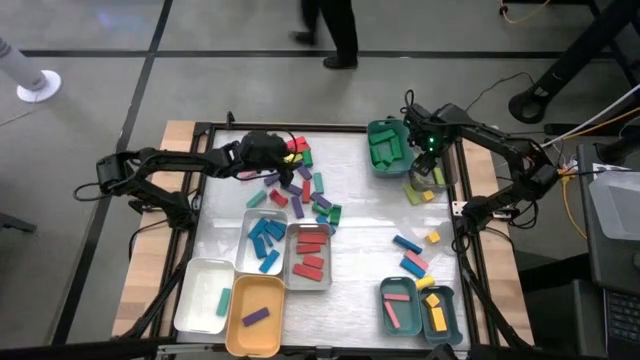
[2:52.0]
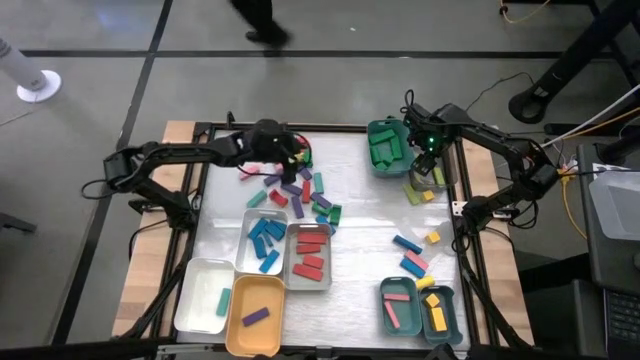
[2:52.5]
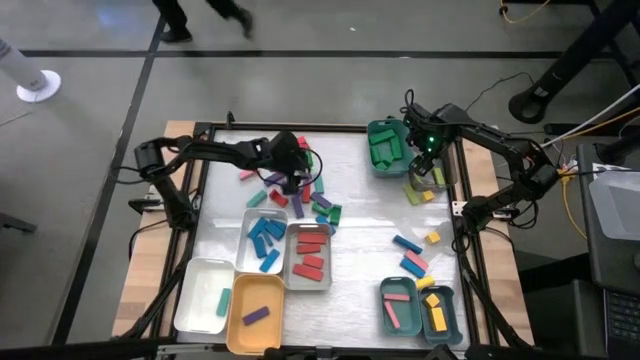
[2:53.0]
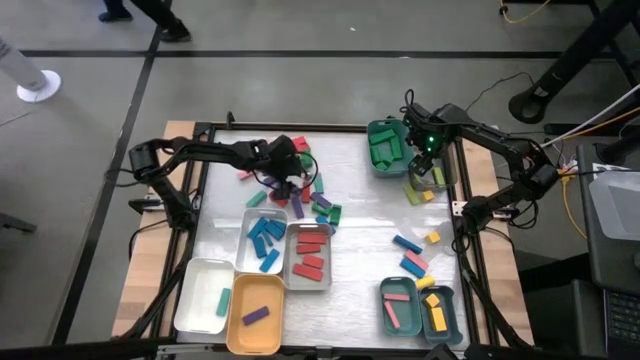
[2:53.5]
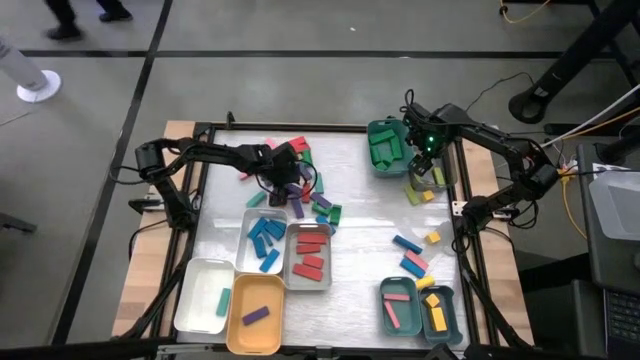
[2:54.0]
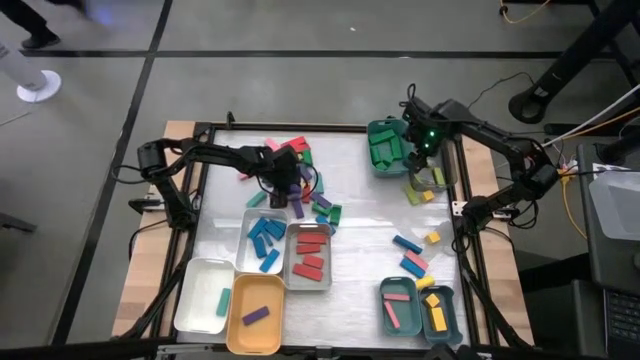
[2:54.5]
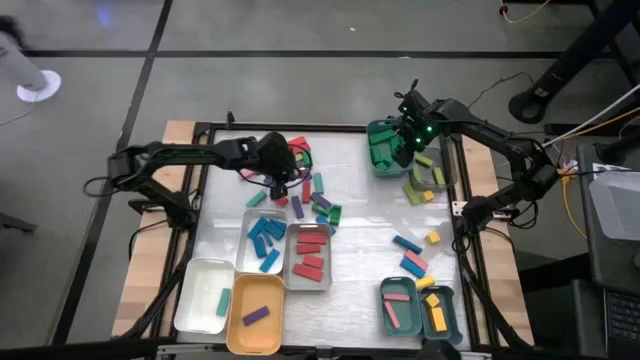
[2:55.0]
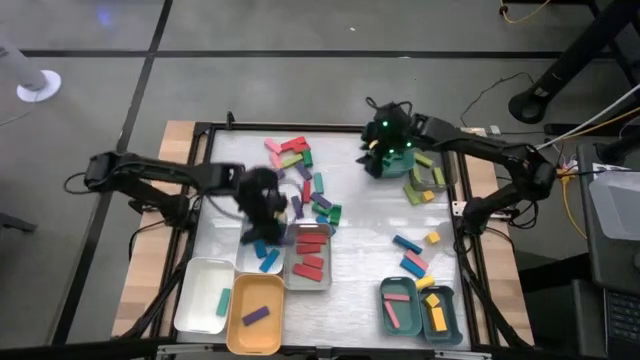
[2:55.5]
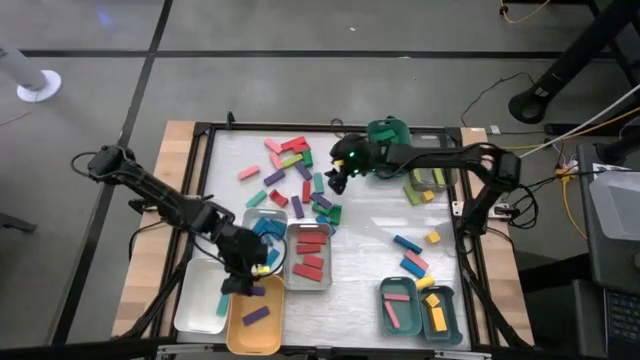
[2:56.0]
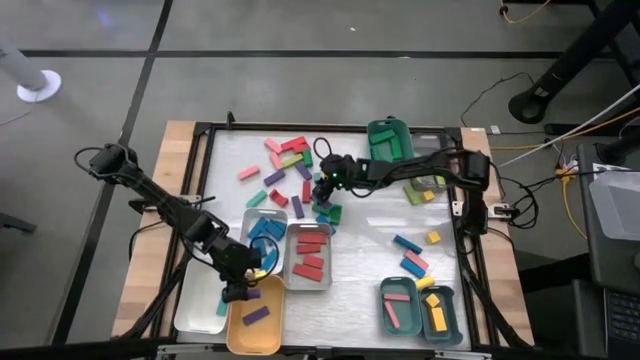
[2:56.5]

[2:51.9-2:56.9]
Task: Sort blocks
Put the purple block into the yellow bin

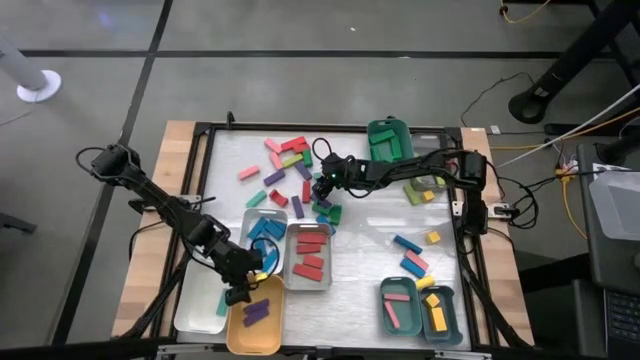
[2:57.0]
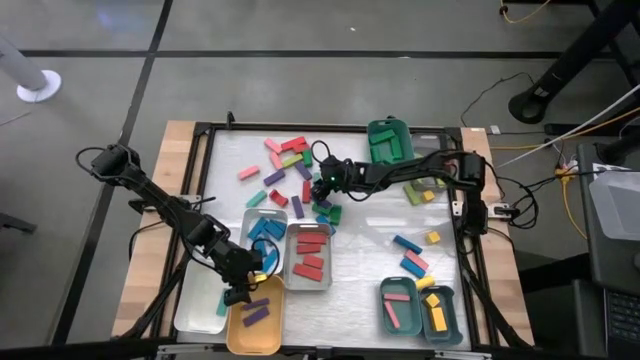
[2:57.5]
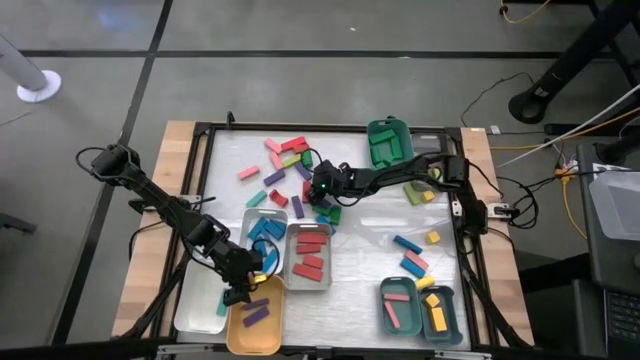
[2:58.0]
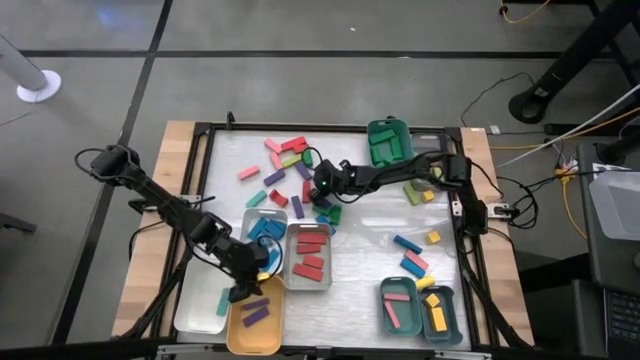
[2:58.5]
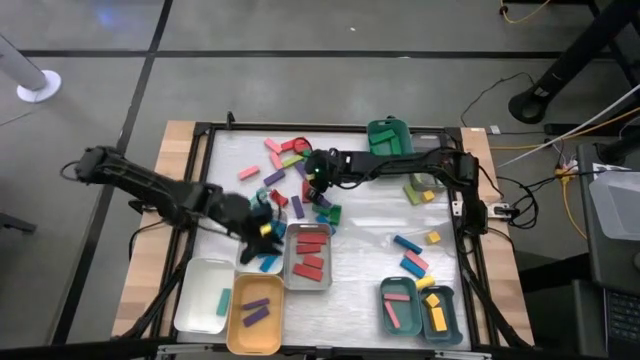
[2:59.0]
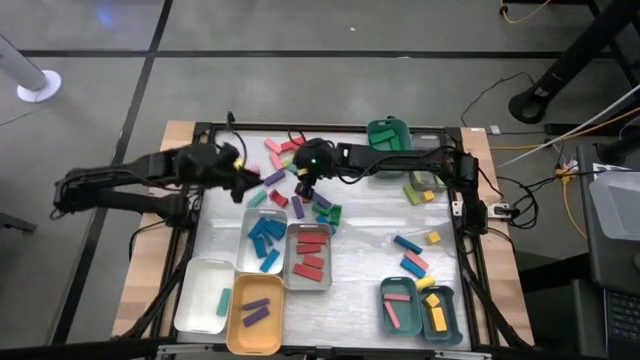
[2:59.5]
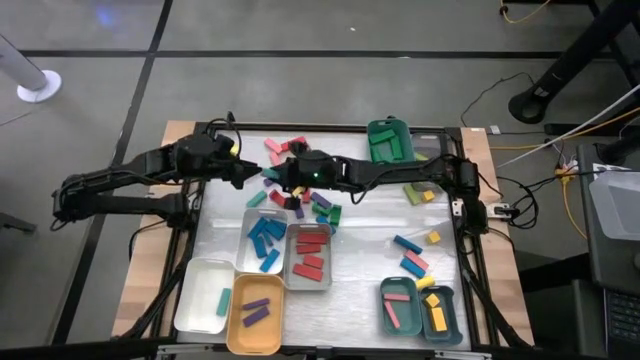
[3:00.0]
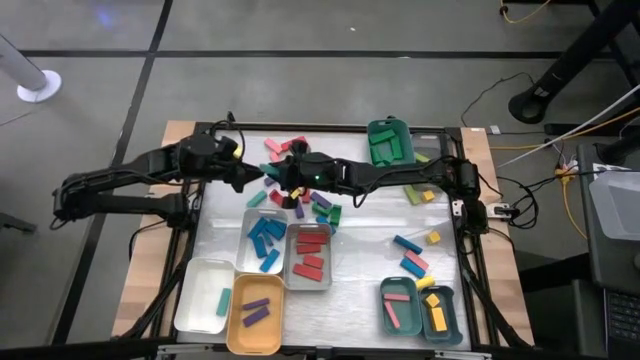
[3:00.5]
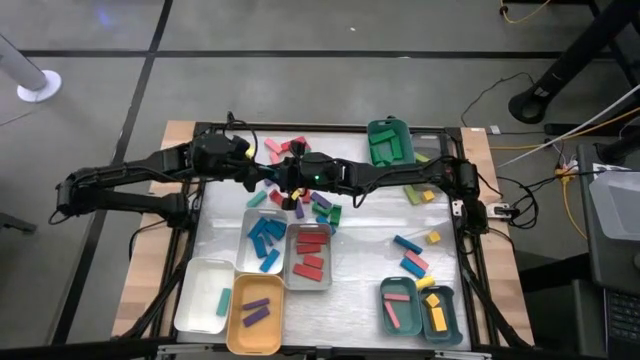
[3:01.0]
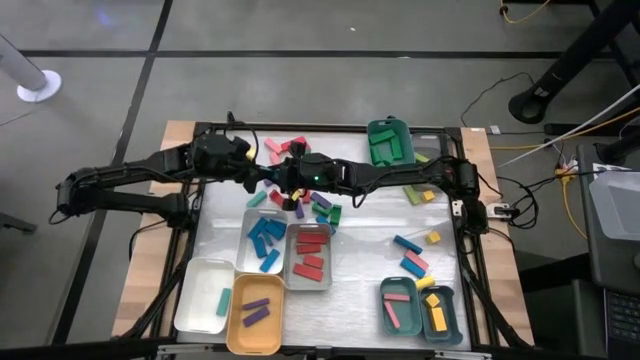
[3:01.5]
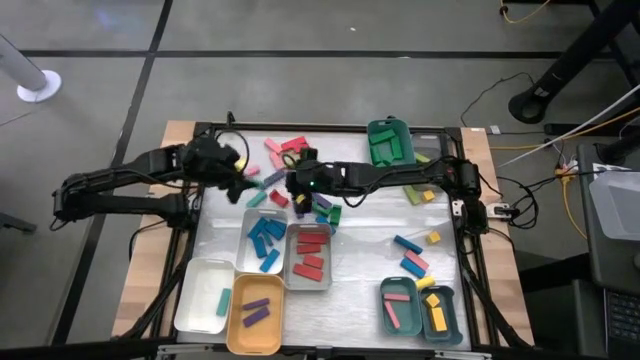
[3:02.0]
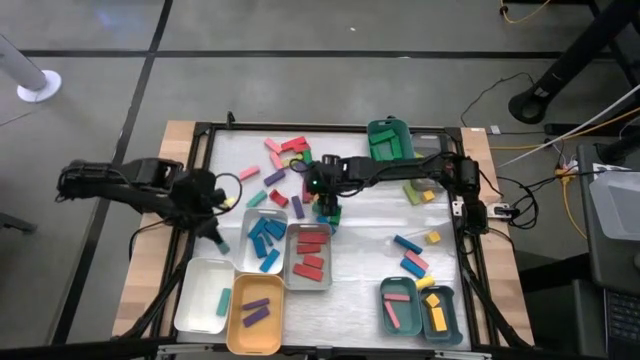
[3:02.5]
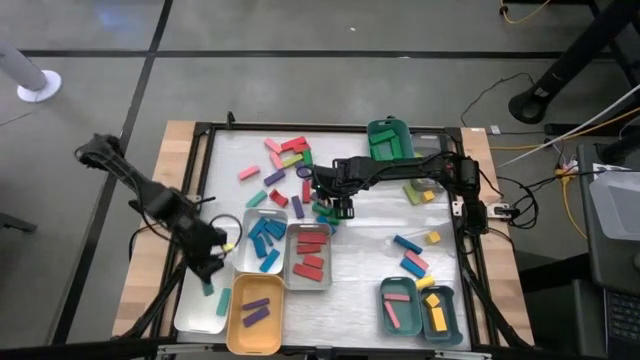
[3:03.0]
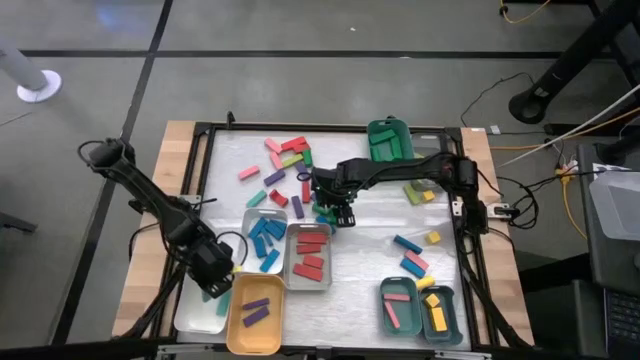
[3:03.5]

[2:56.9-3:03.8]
Put the light blue block into the bottom white bin

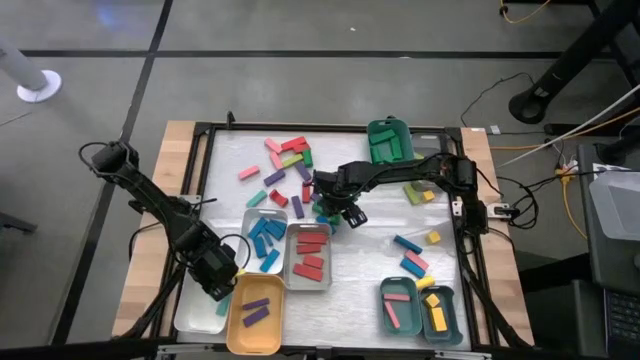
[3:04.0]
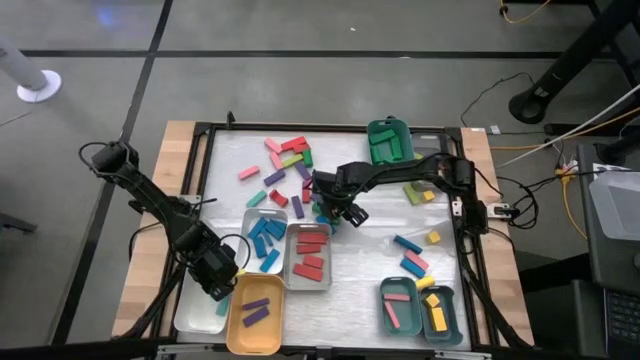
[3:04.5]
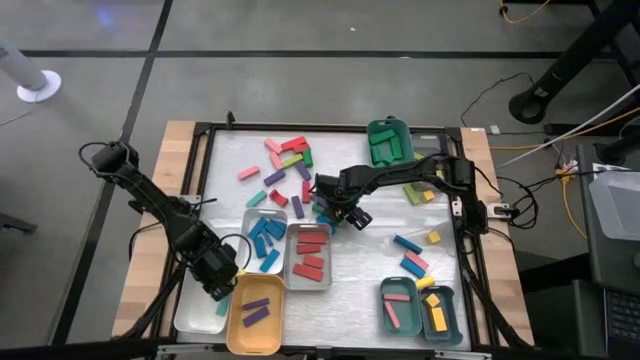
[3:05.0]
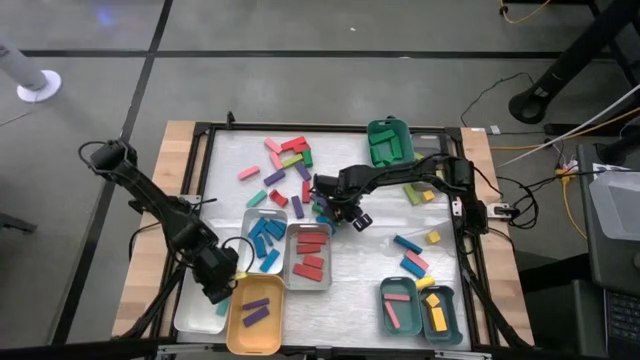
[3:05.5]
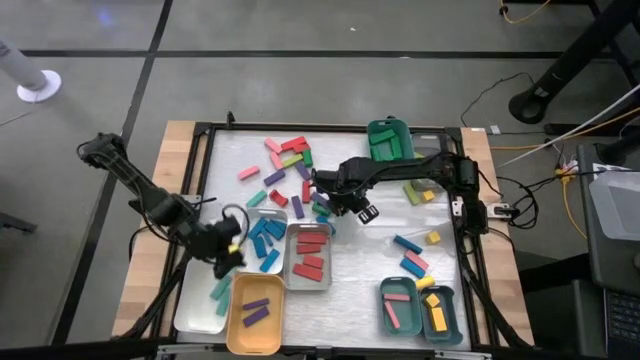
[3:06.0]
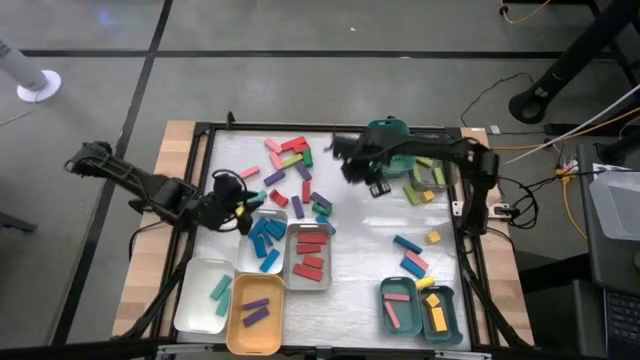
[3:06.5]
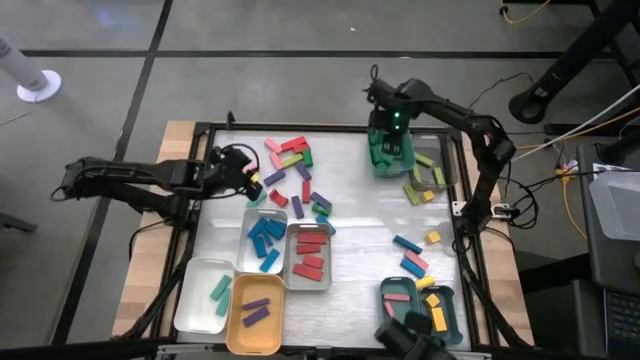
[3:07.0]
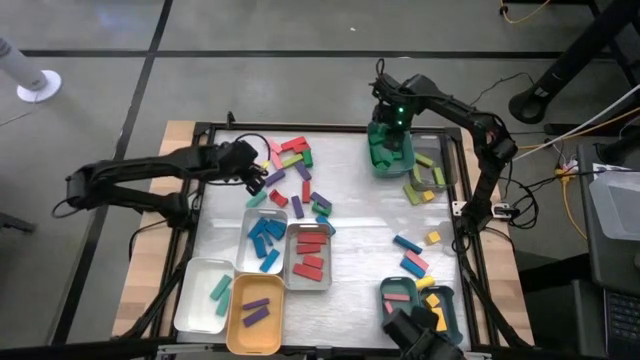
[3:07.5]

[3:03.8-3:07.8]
Put the green block into the top green bin

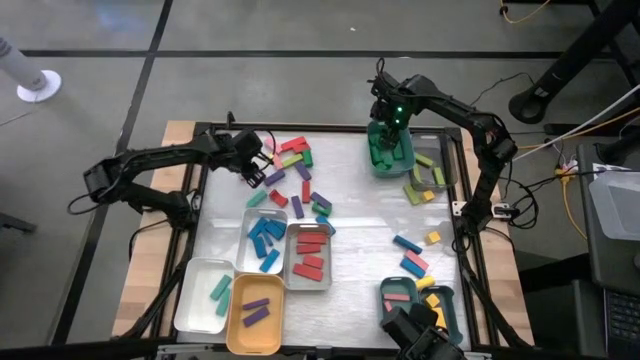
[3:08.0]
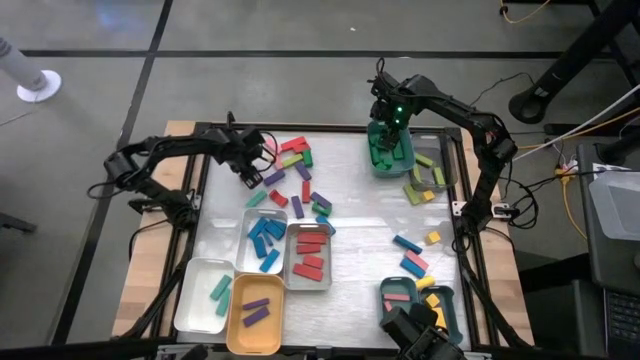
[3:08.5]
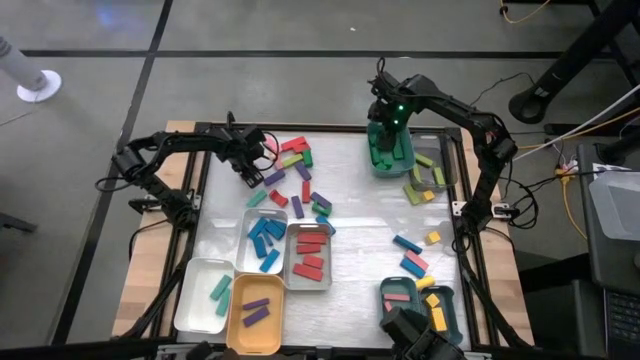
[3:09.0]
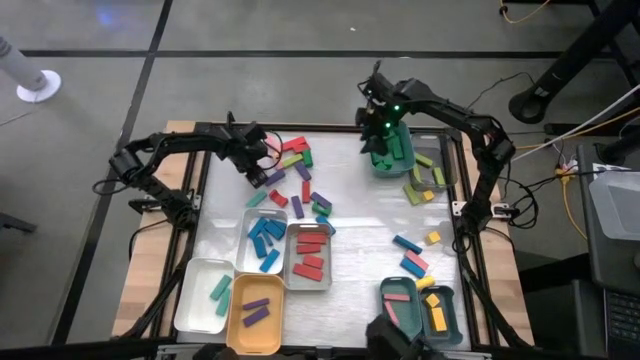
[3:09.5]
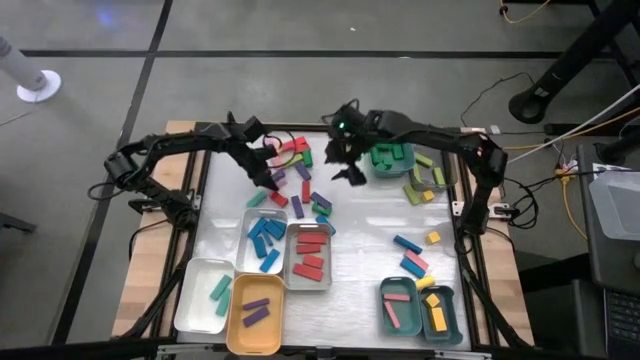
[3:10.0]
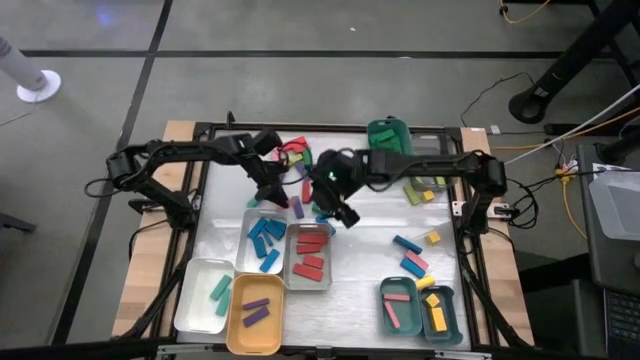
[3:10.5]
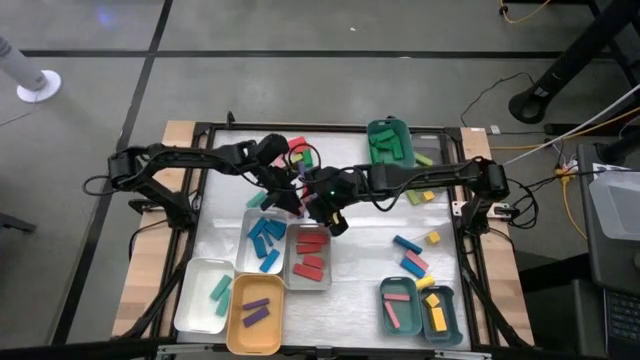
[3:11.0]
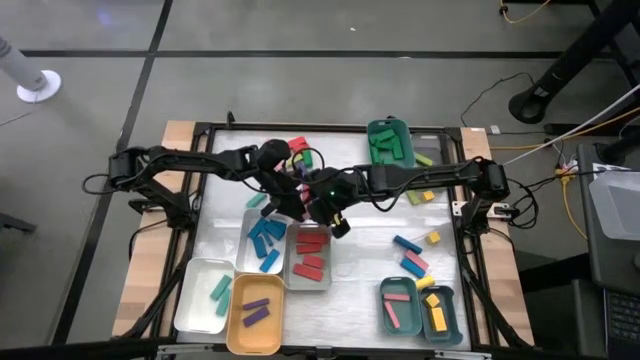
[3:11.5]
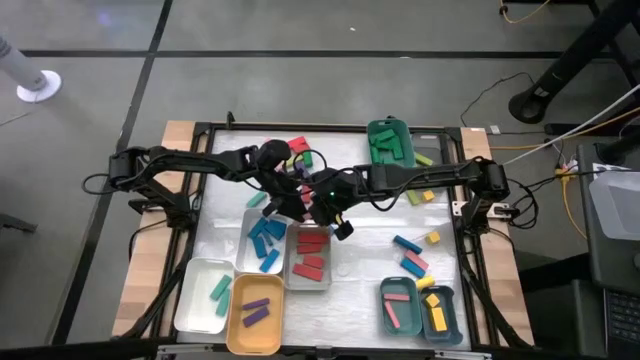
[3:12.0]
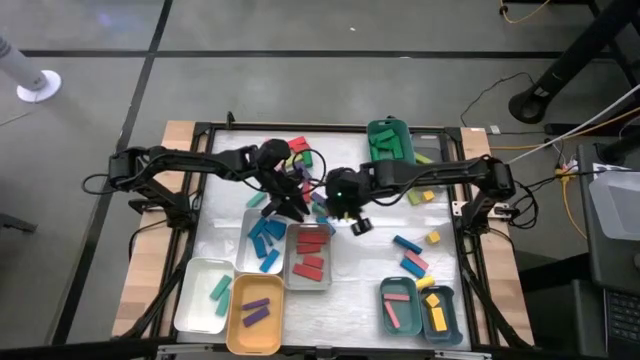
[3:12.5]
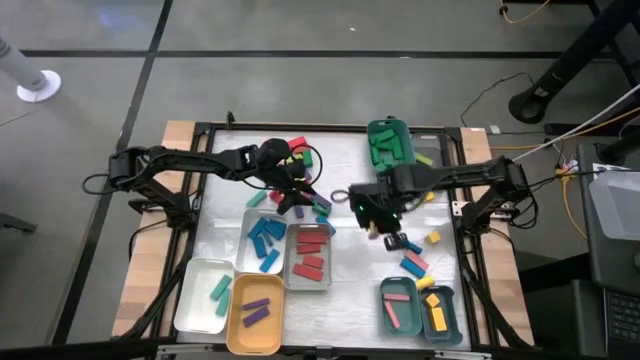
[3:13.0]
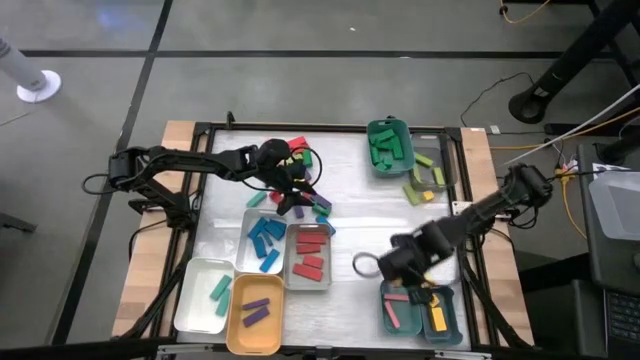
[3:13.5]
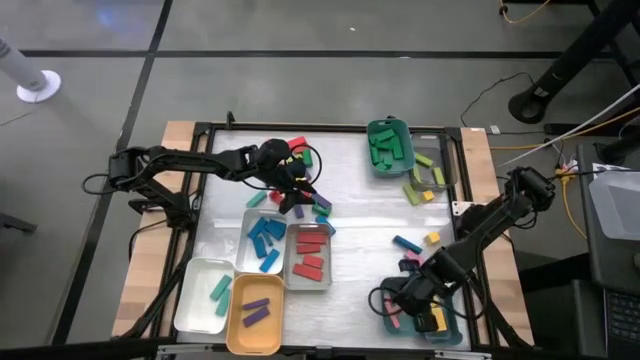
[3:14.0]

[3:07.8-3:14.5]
Put the pink block into the bottom green bin
